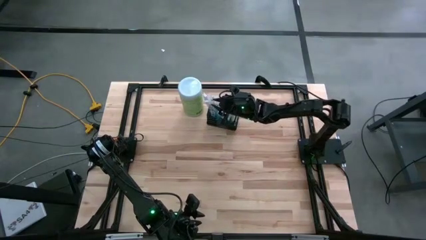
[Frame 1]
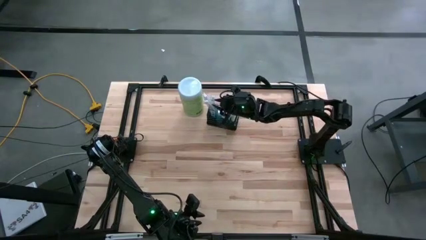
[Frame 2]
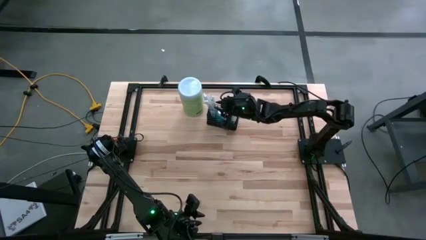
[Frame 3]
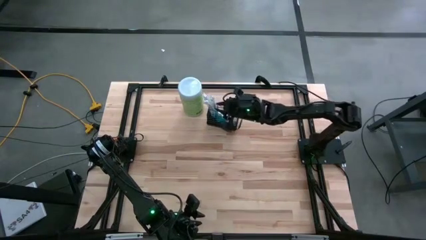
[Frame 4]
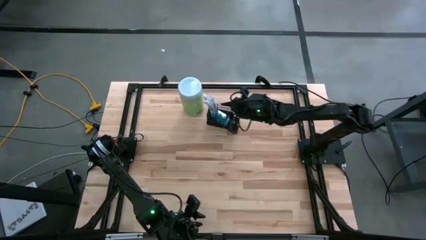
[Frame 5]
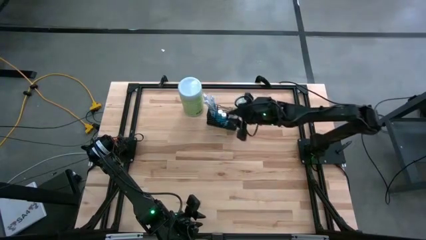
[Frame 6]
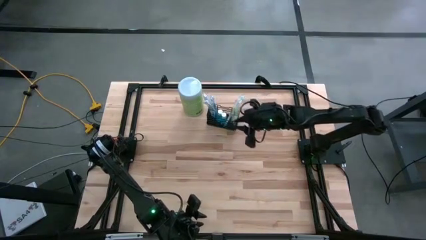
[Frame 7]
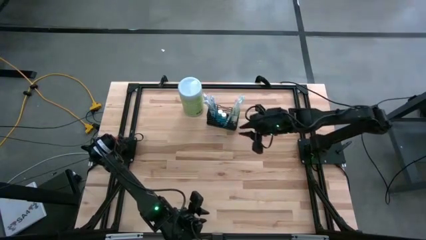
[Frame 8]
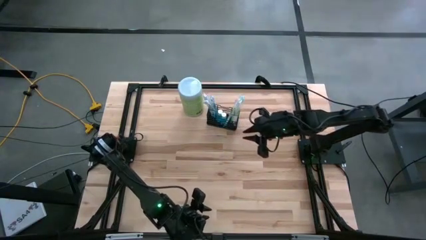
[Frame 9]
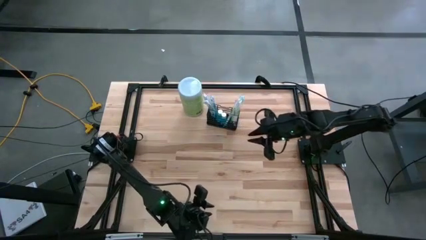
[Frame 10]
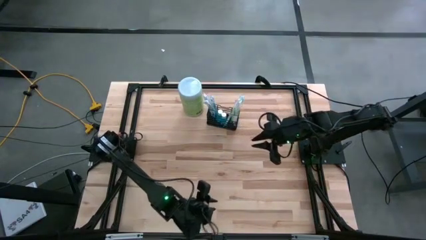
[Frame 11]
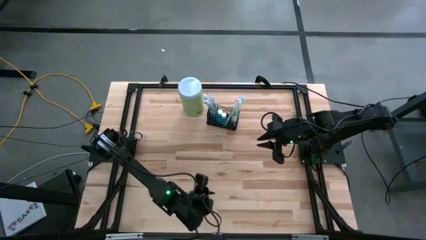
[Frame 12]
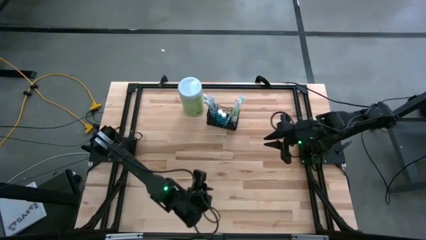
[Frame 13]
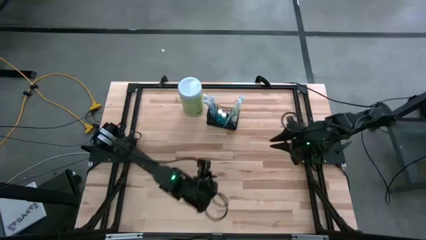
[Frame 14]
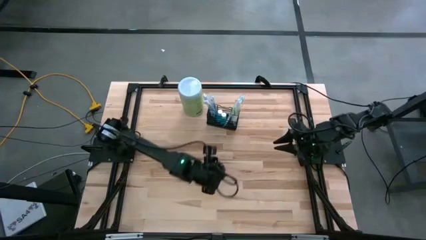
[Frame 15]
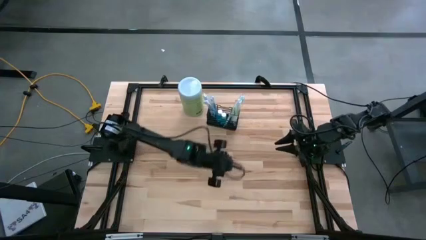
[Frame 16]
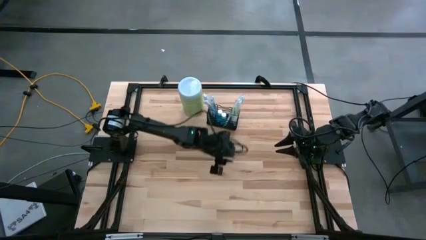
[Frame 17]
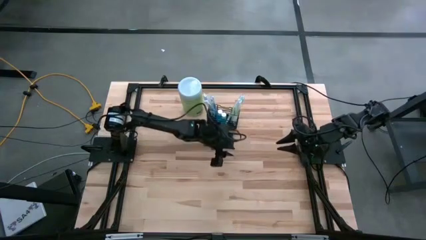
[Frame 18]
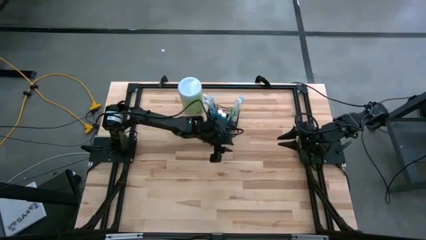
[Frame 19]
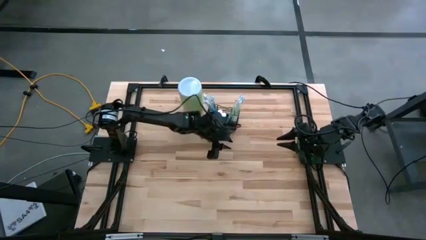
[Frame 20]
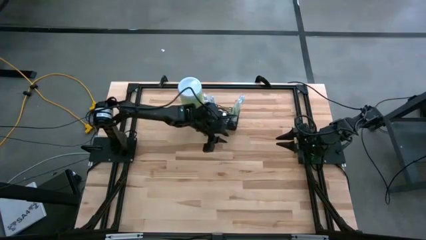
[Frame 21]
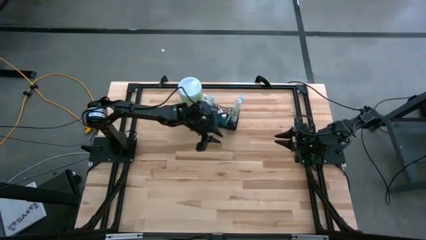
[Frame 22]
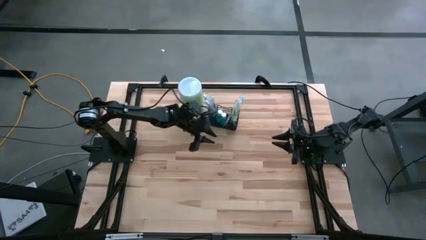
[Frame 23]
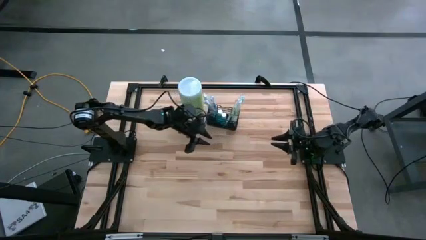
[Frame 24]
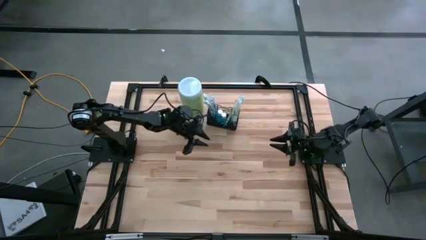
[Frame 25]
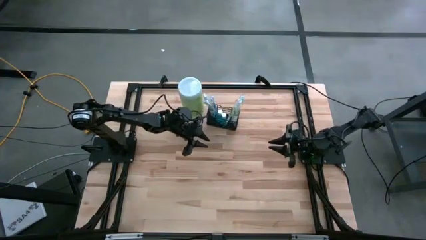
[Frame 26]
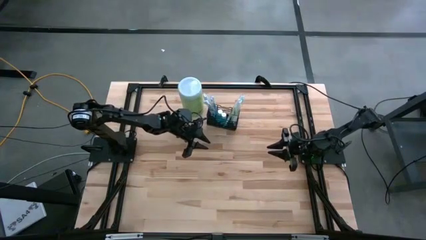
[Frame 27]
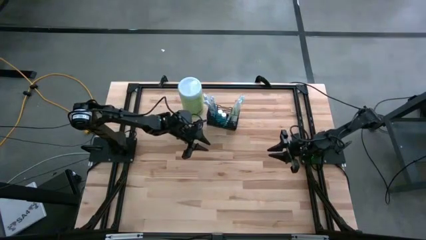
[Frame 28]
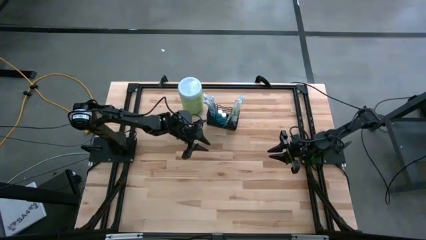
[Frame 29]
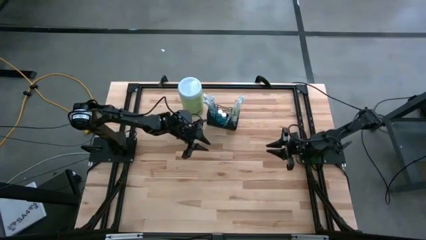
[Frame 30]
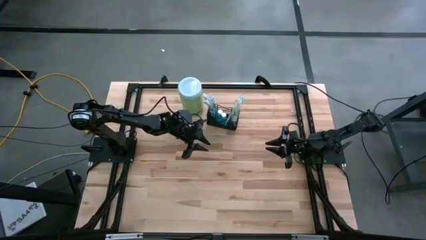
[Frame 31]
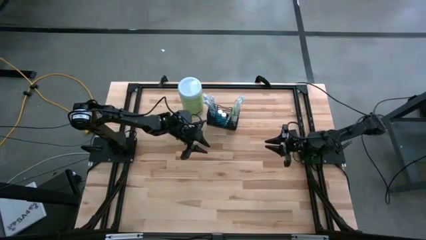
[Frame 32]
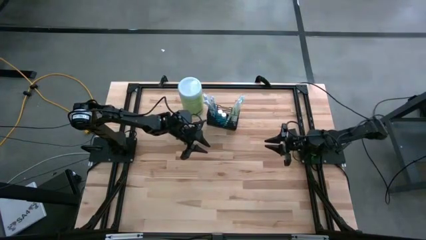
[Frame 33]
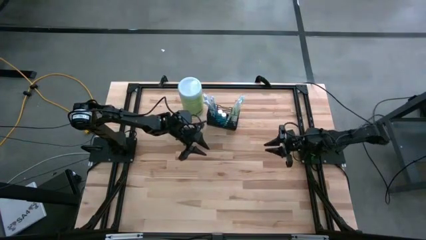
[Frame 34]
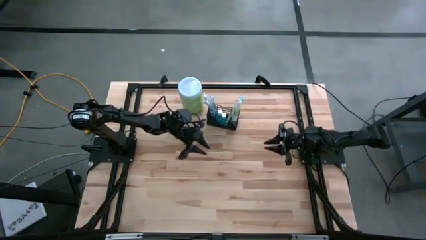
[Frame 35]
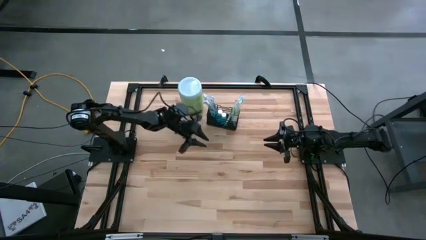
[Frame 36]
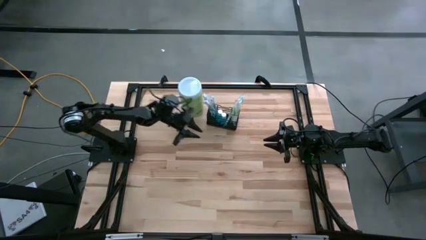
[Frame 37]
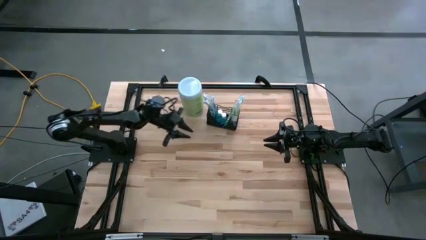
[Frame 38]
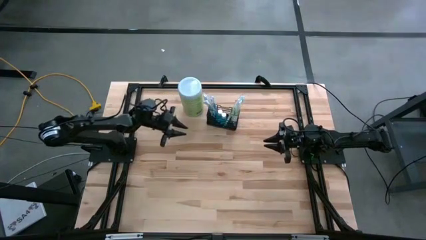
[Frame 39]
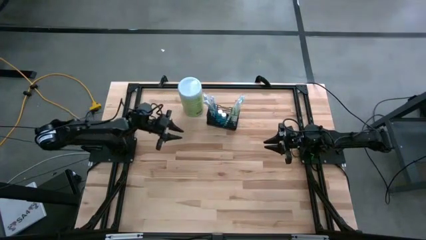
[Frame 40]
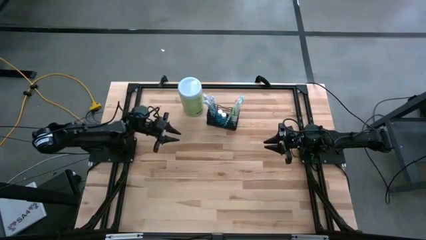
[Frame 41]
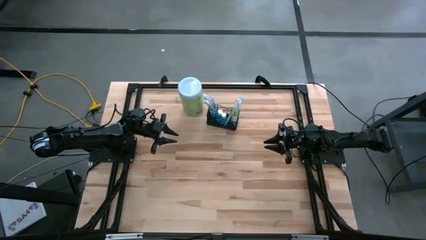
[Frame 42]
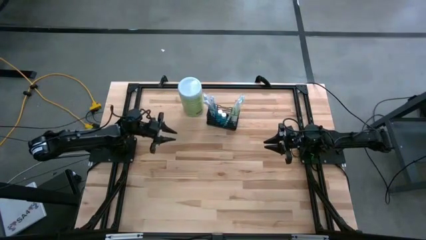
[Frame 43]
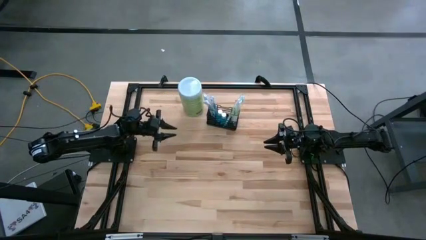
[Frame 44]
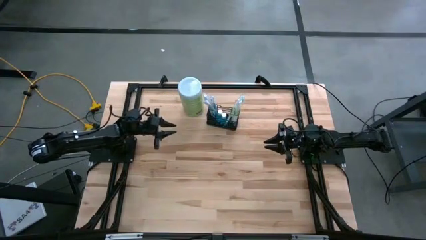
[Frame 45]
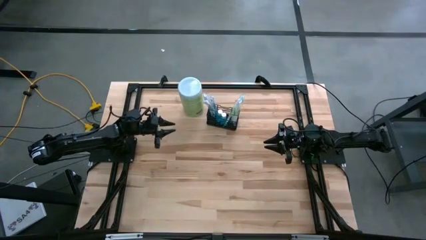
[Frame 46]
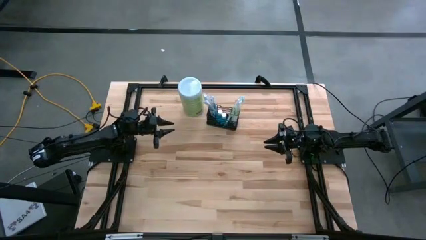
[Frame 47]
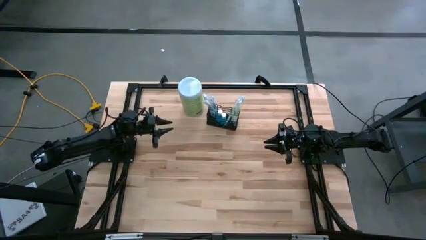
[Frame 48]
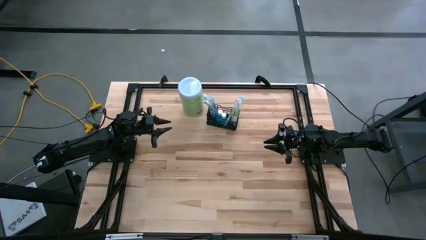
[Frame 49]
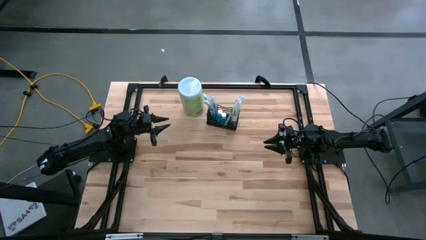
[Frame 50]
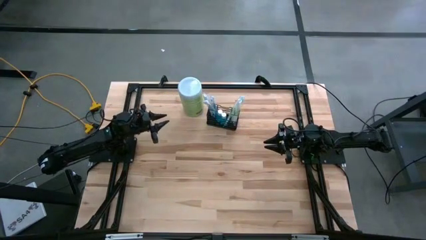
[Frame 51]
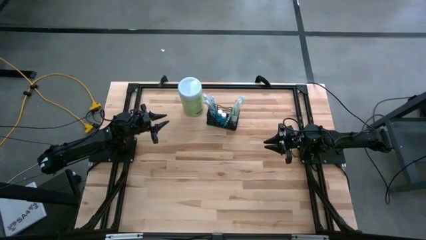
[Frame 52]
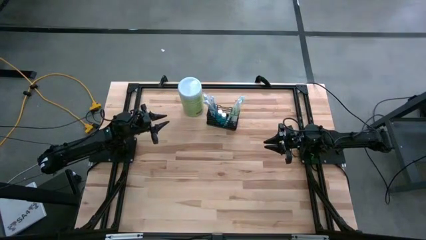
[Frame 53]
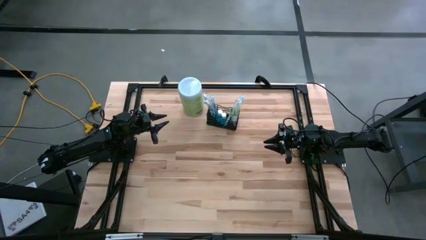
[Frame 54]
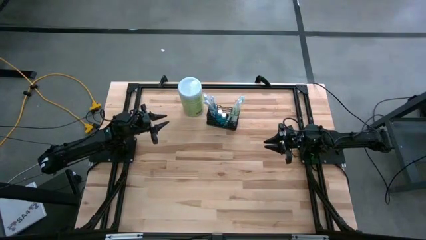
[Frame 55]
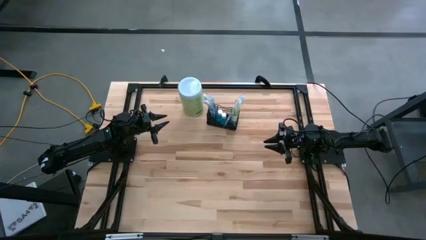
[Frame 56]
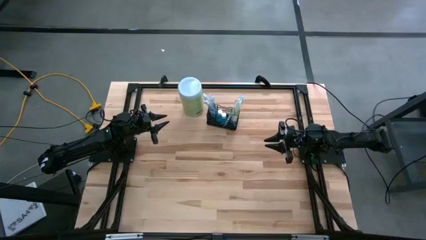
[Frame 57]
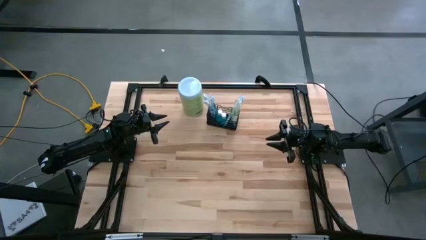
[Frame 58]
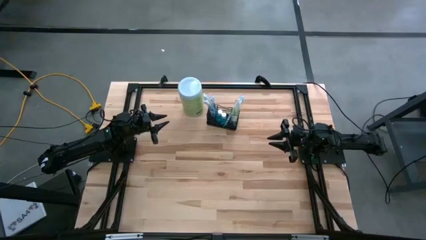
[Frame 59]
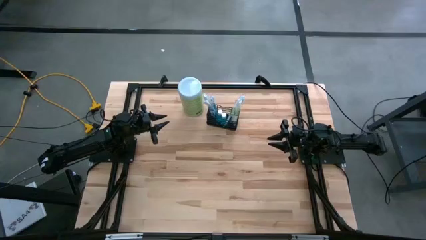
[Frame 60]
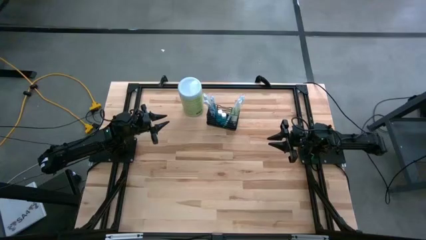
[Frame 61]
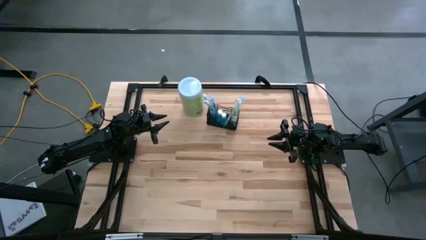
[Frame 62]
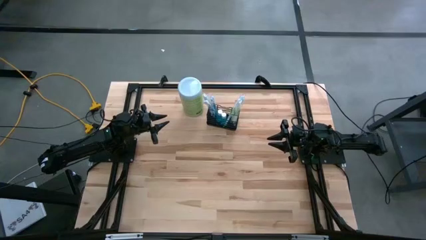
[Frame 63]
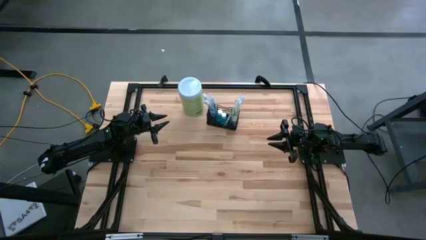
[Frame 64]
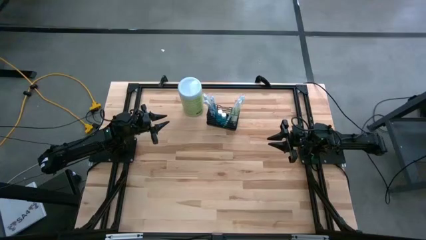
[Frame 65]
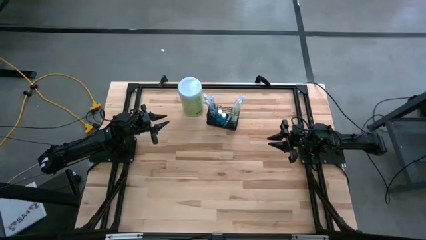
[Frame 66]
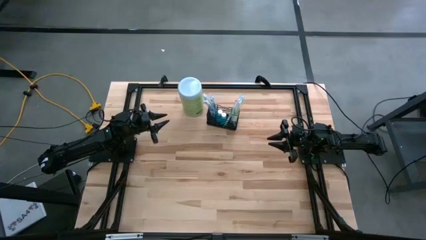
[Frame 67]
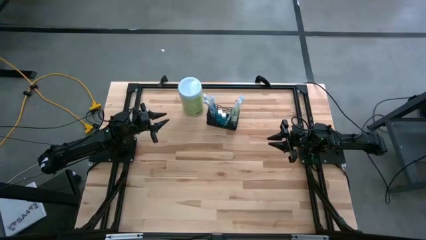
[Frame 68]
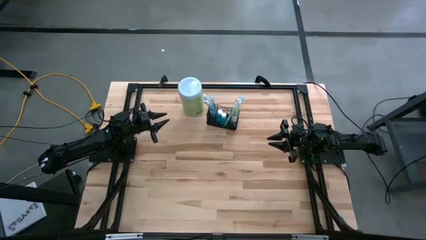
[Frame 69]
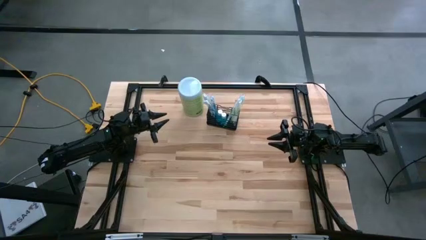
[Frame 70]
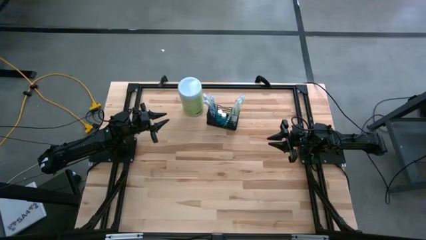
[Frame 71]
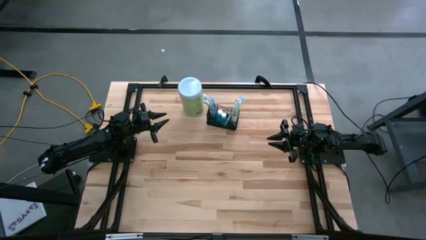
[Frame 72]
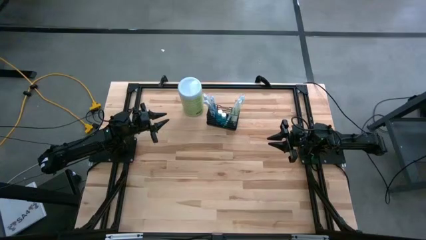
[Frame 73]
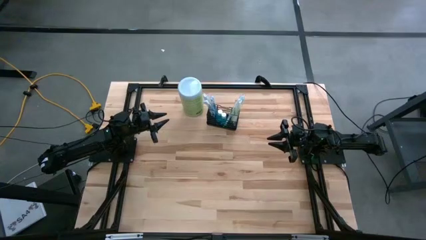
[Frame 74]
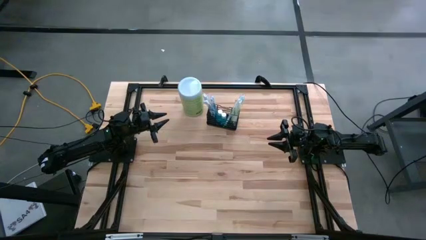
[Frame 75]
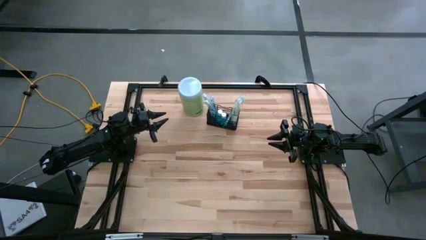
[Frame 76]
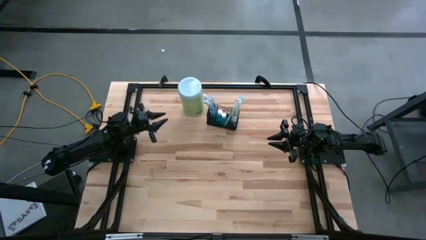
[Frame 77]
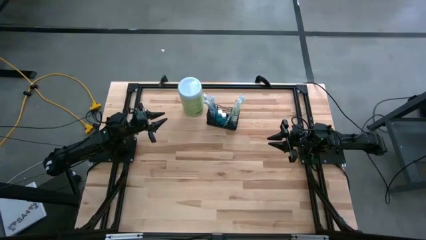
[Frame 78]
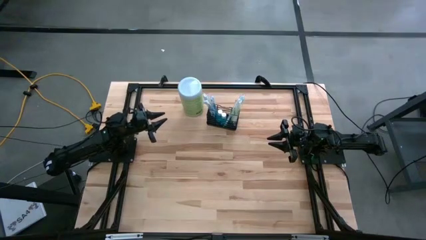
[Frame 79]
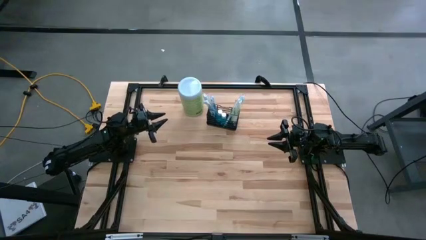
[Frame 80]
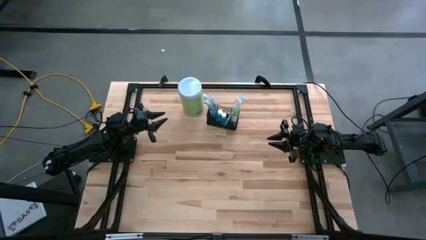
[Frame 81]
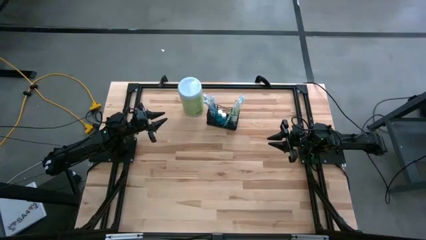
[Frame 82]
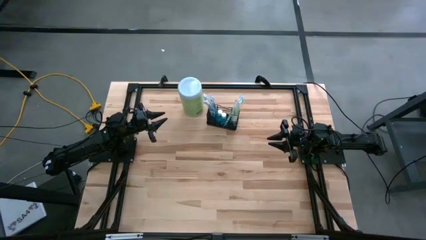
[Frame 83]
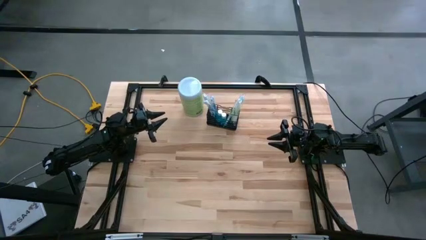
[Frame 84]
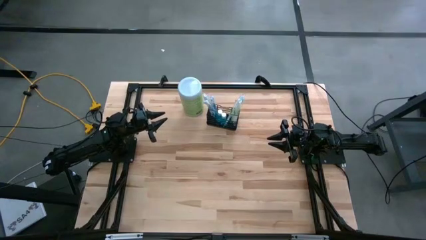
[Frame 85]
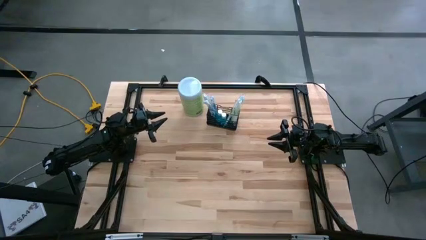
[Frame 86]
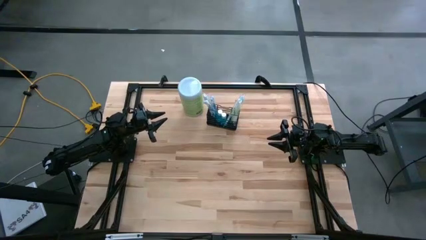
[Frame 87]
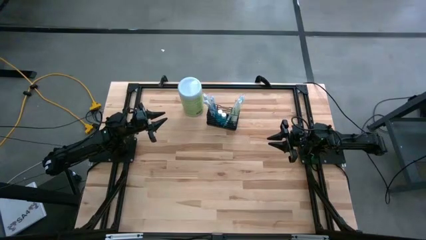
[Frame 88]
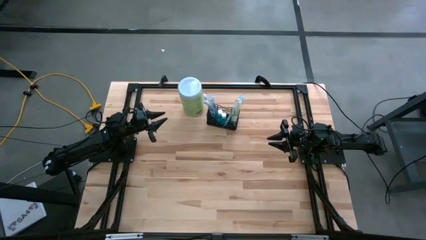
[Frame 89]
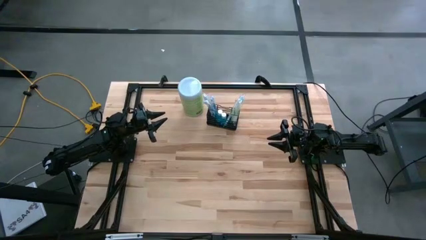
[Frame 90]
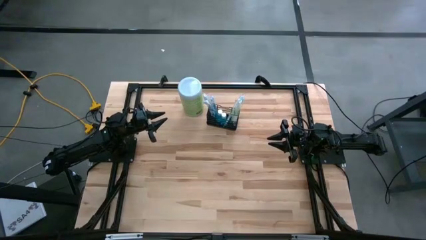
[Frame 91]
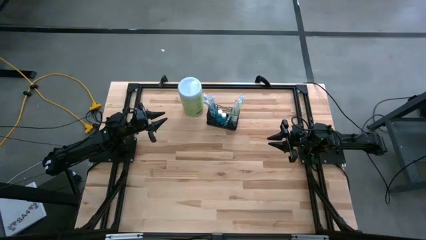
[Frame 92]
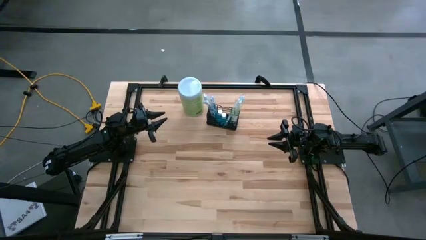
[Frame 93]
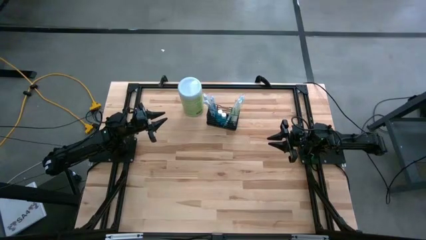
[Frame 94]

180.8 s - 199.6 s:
Task: Pick & Place toothbrushing station
Return to Home Position
